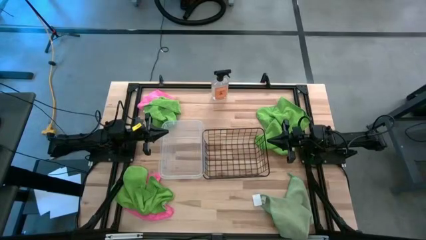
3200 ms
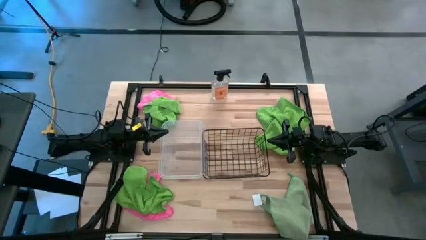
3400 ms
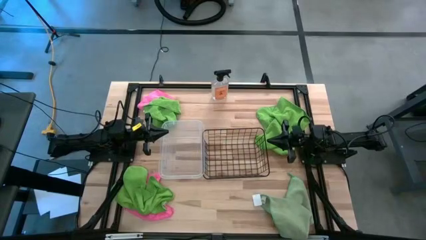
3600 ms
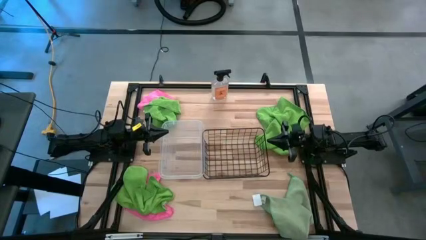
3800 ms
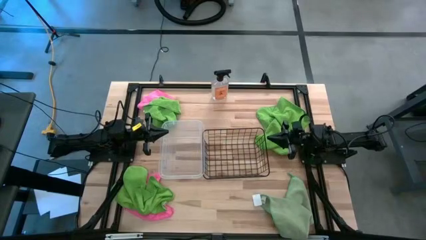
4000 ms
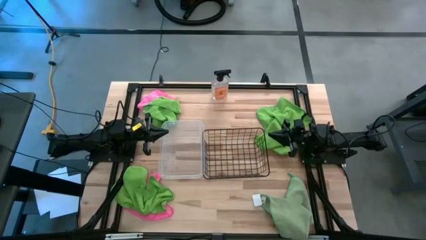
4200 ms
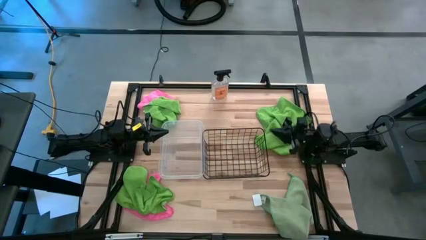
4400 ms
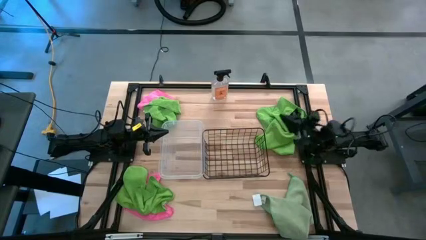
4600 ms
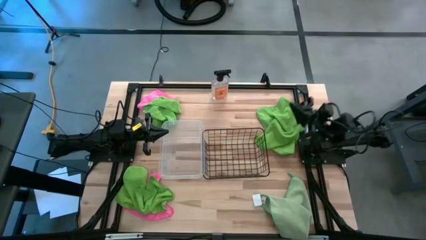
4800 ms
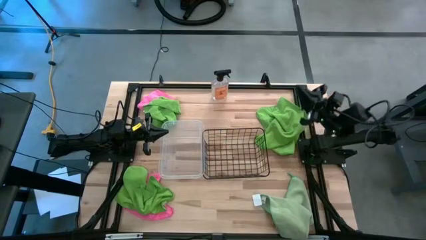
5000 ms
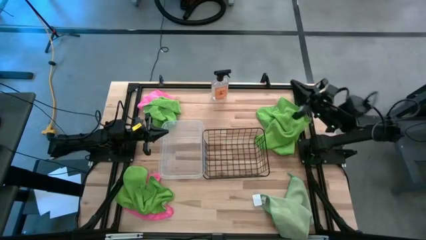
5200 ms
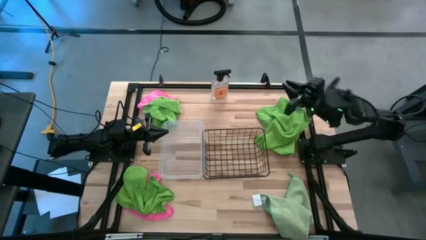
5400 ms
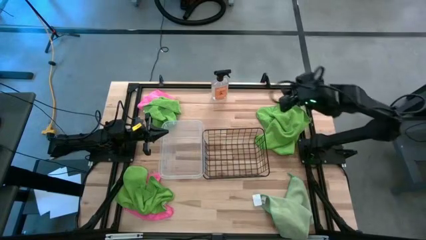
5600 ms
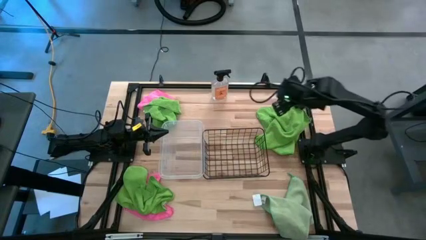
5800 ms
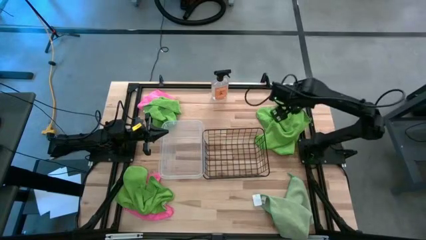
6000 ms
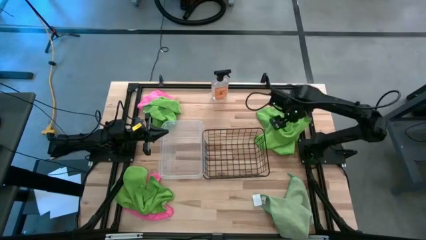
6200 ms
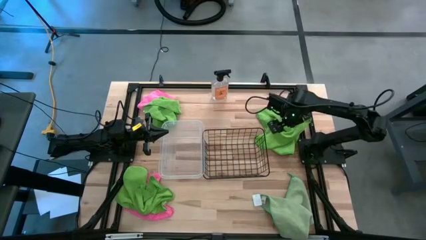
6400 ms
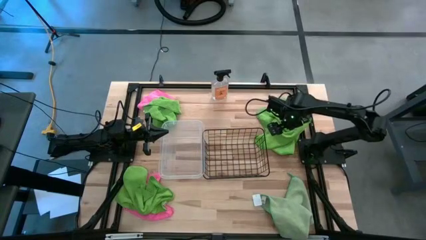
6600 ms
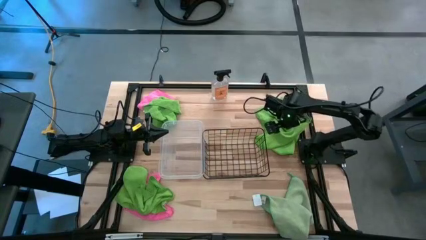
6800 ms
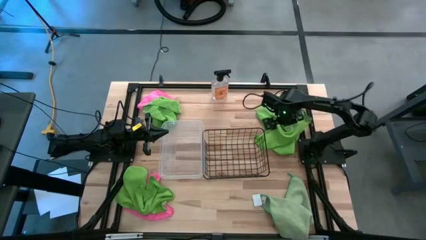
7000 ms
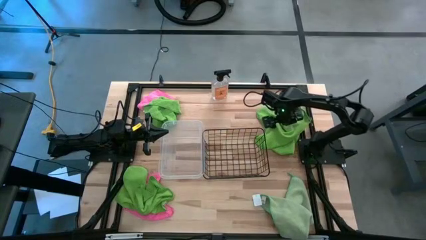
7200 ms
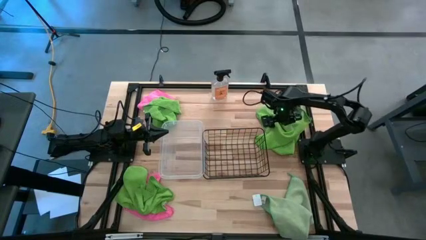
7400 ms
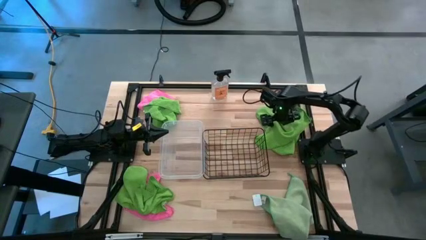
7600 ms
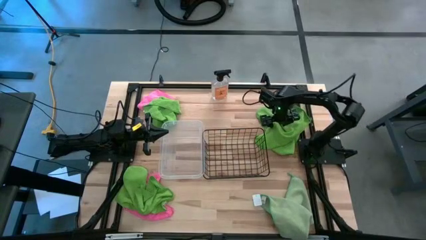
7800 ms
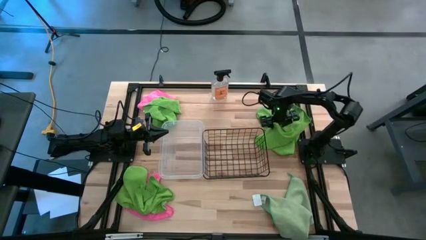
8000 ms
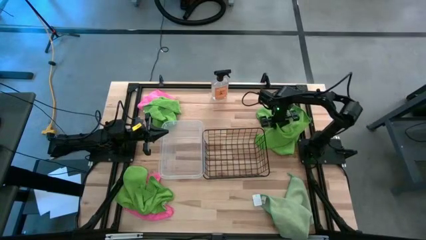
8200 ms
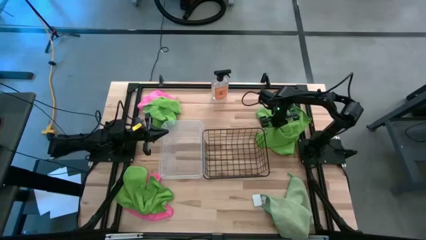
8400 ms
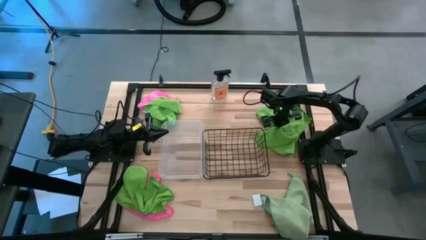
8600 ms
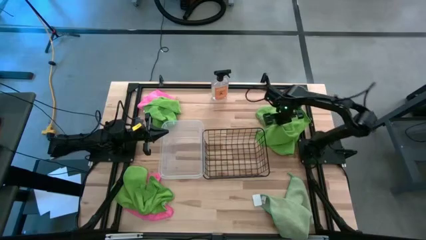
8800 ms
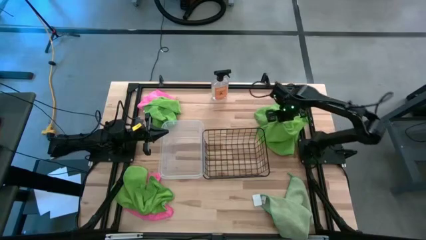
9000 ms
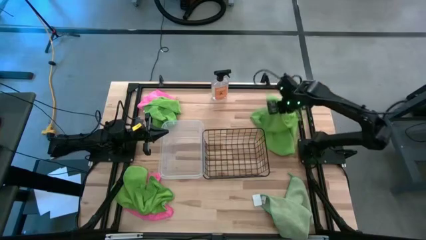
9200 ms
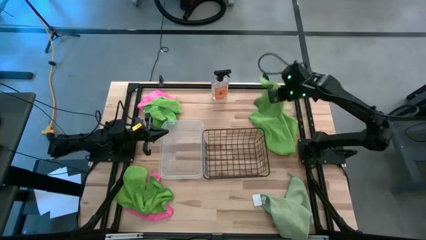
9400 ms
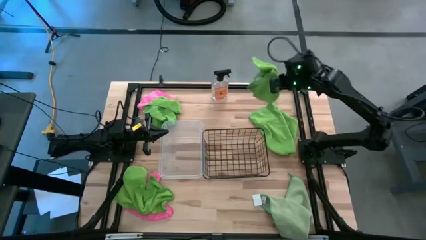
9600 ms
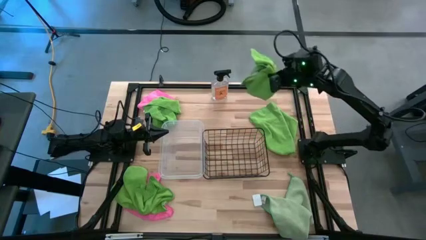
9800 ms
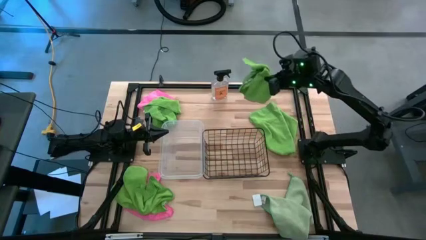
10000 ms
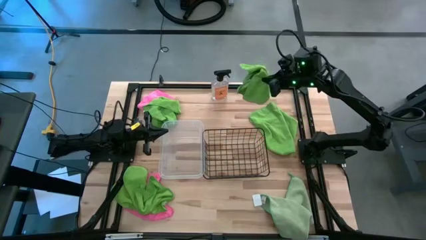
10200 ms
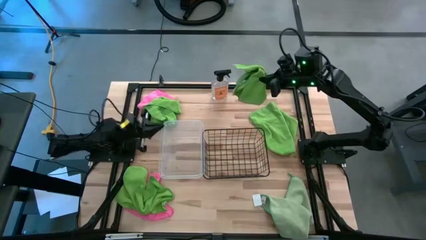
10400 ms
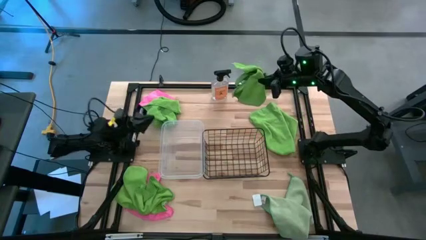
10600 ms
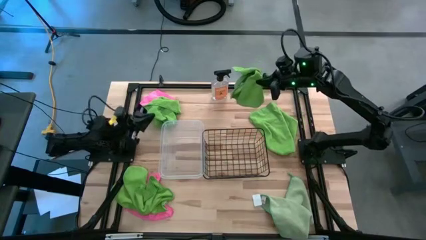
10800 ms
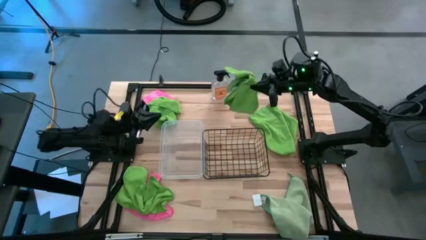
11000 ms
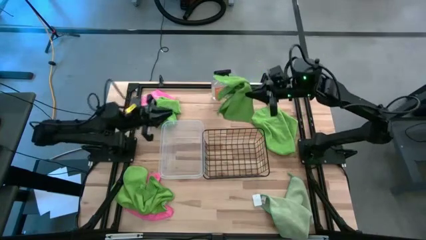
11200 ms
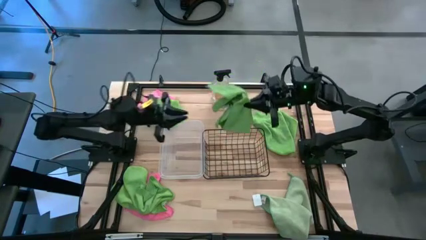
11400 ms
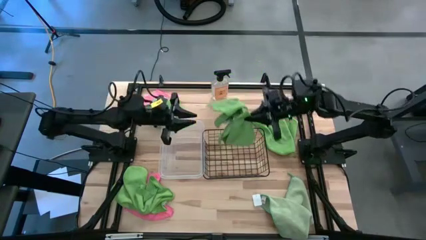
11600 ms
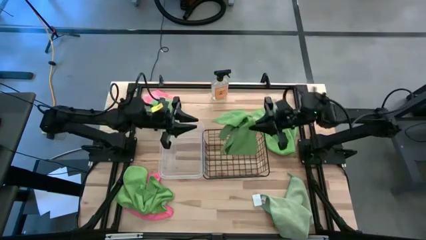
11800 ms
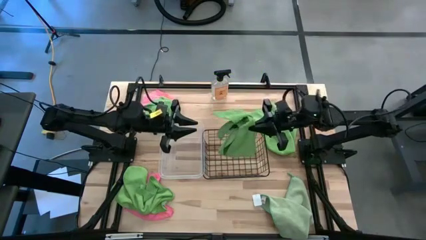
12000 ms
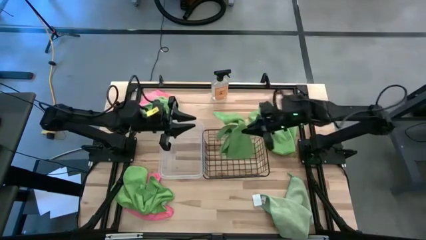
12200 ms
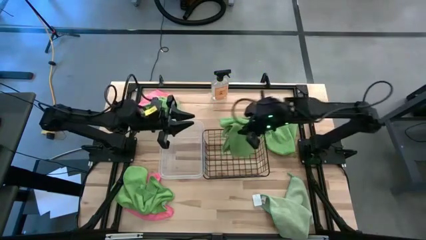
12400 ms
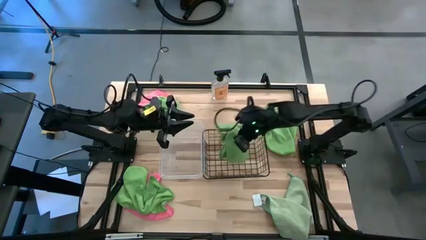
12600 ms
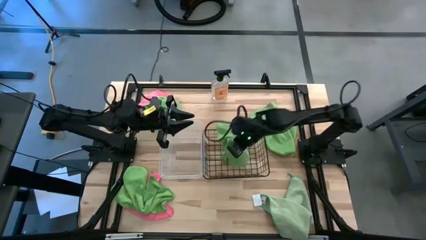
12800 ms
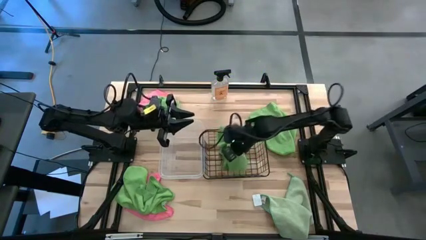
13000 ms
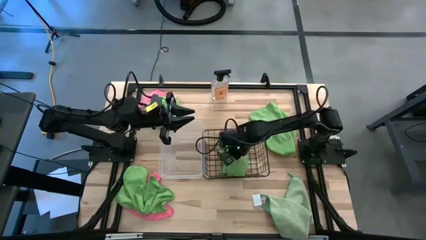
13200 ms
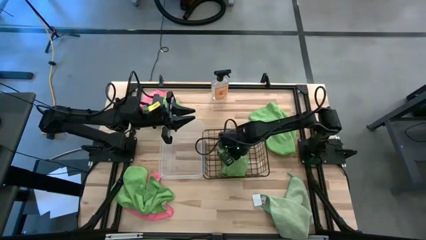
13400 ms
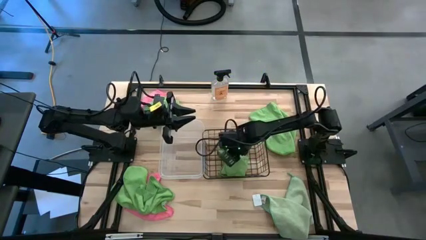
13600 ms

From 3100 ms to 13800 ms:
Task: Sort microfiber towel by color & place in baskets
Put the green towel into the wire basket

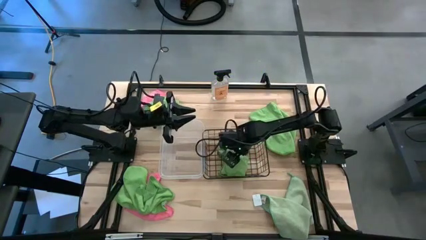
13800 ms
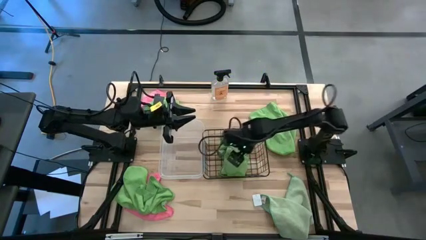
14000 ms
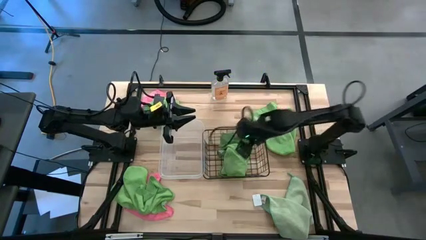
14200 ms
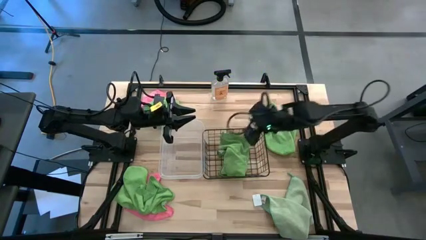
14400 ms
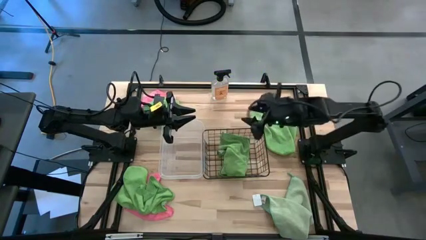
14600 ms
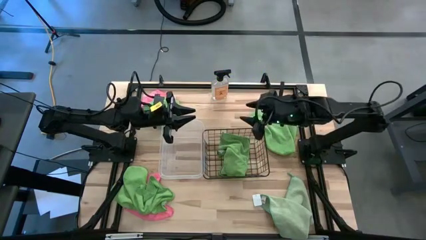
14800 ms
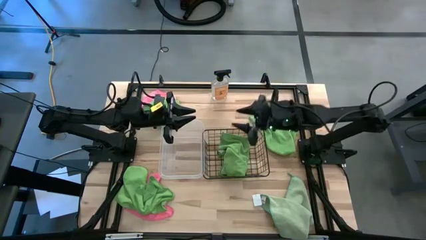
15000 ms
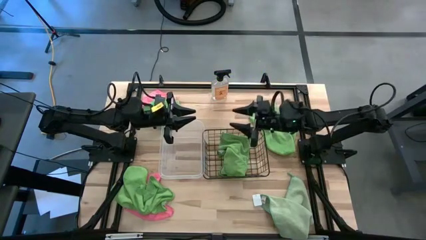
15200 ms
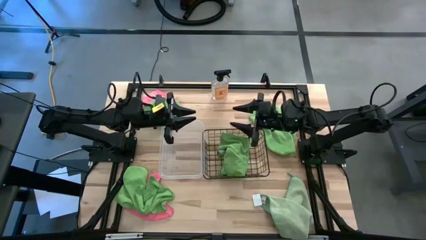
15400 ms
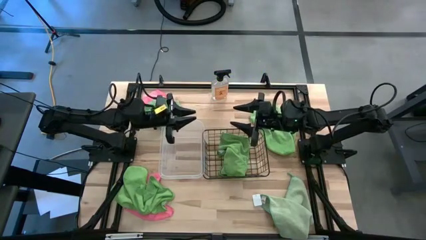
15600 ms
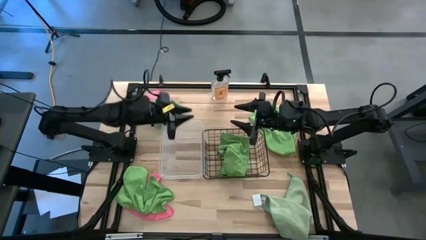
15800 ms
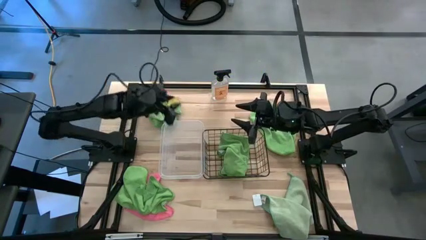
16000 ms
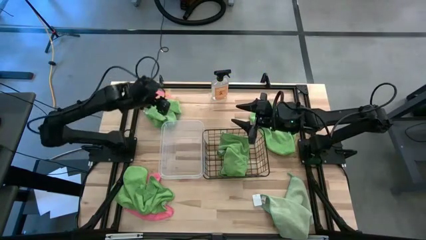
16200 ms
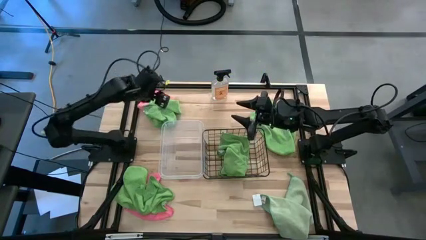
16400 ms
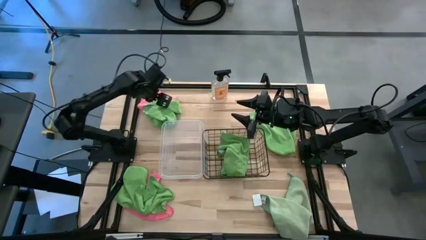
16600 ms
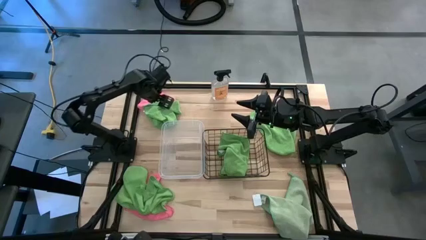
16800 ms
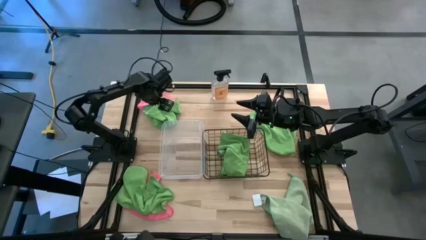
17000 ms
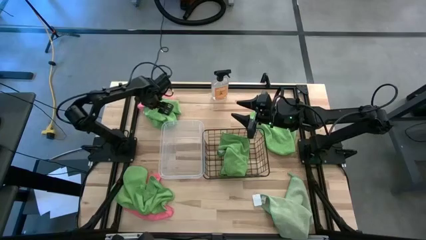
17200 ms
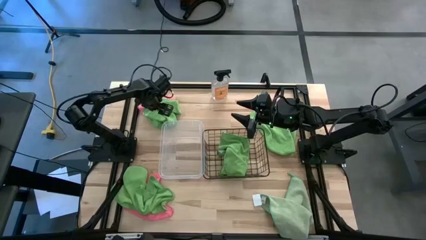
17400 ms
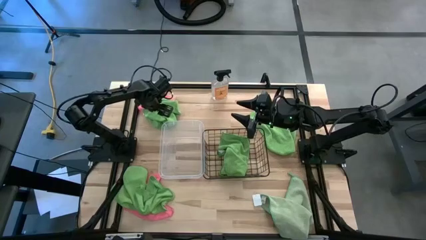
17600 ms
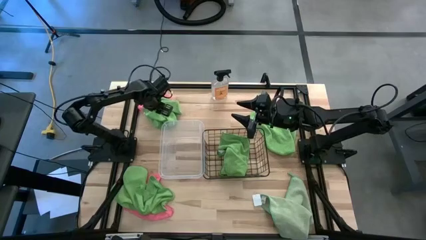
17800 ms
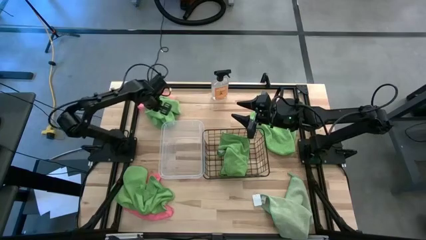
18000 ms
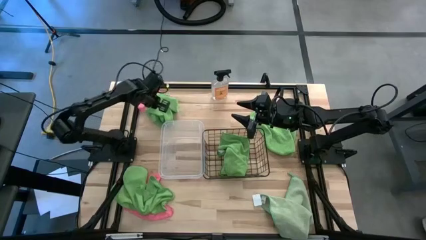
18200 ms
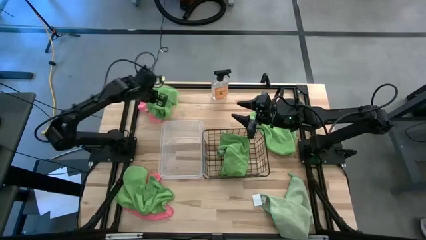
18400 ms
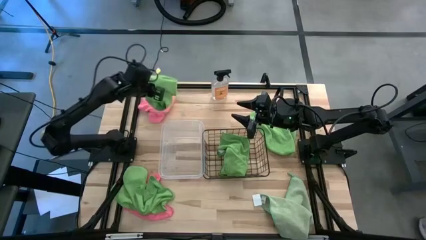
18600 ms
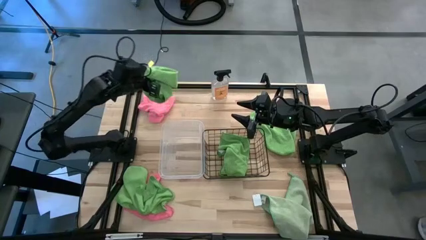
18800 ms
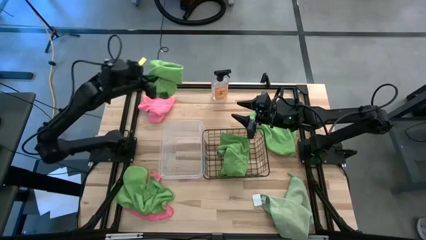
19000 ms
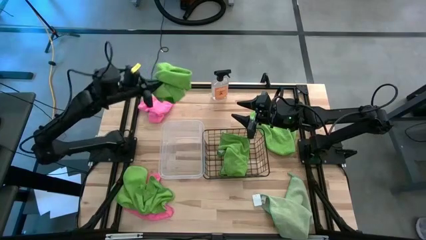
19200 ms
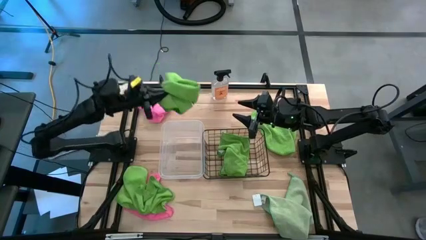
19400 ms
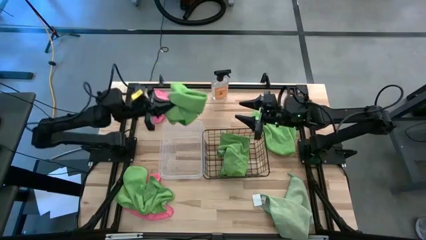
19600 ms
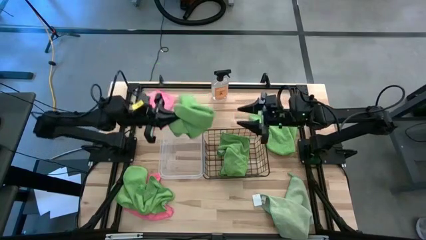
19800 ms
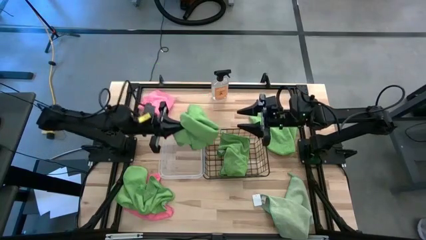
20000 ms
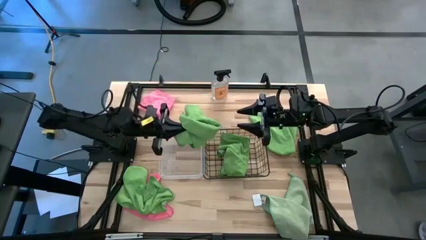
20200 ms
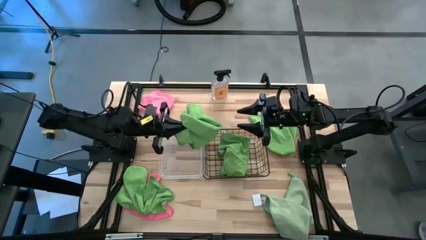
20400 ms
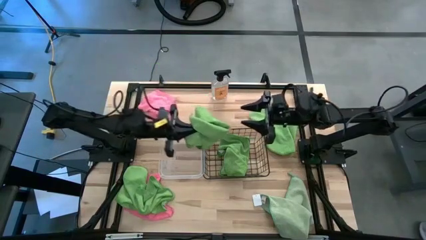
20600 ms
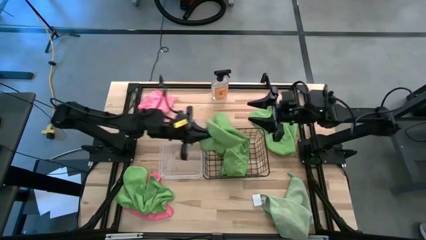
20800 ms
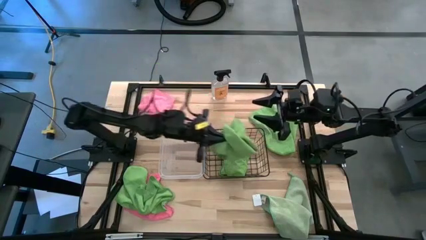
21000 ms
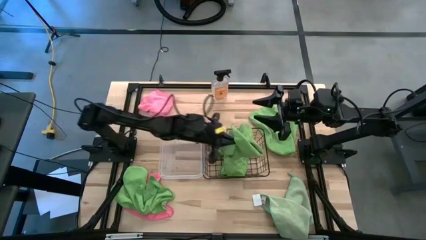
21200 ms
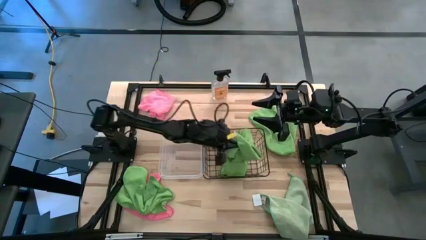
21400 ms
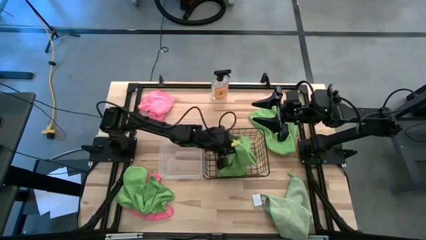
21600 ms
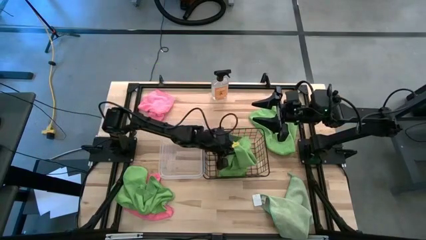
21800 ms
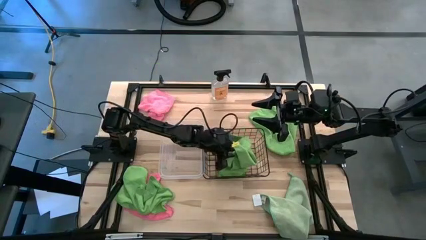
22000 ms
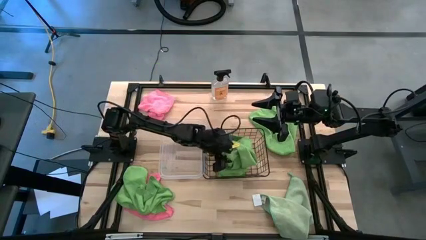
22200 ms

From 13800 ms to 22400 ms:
Put the green towel into the wire basket
